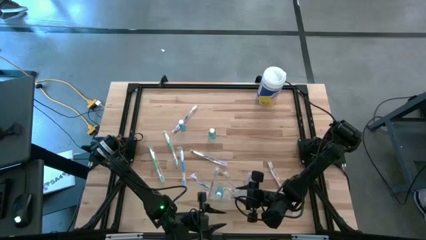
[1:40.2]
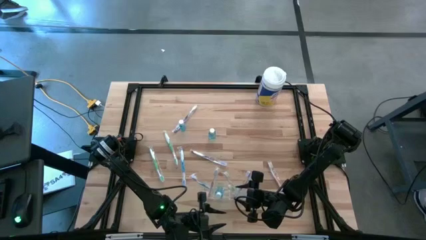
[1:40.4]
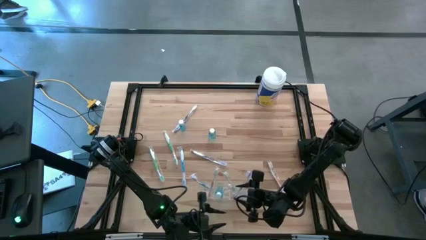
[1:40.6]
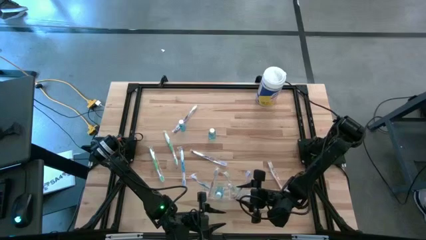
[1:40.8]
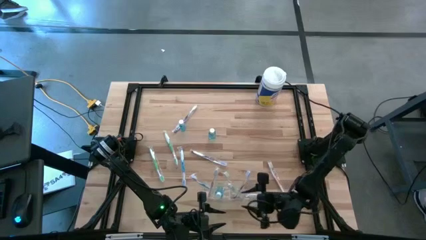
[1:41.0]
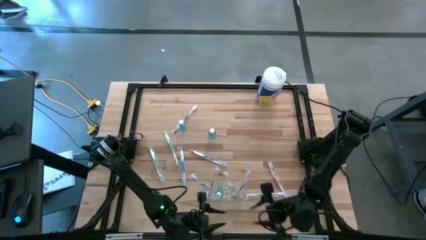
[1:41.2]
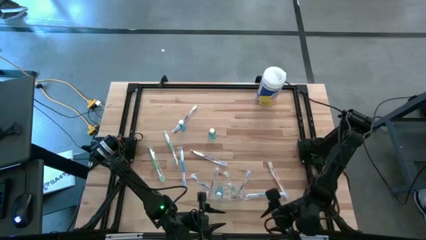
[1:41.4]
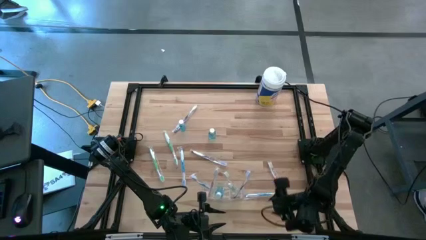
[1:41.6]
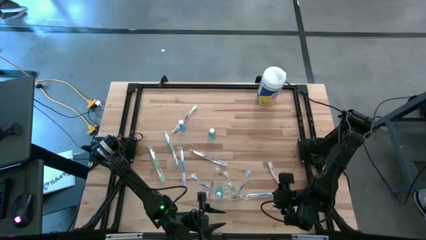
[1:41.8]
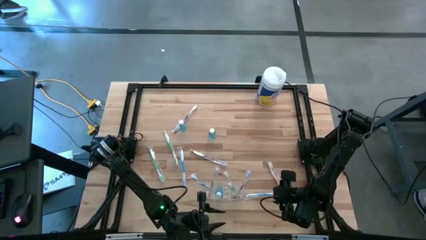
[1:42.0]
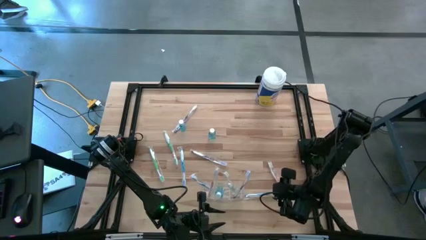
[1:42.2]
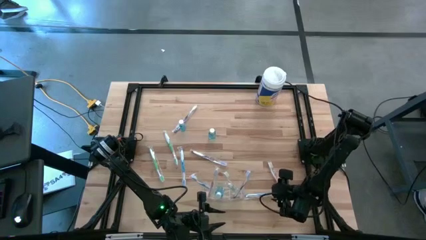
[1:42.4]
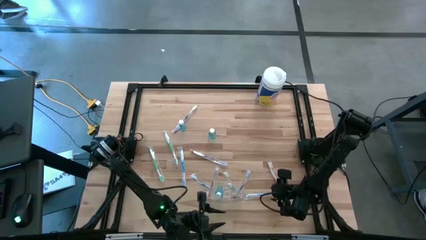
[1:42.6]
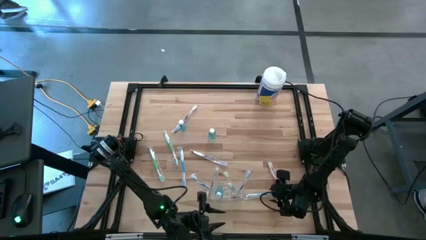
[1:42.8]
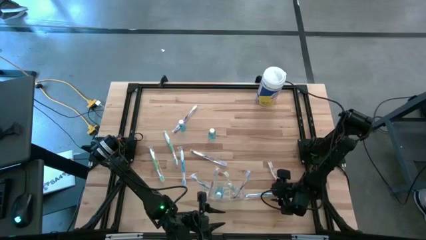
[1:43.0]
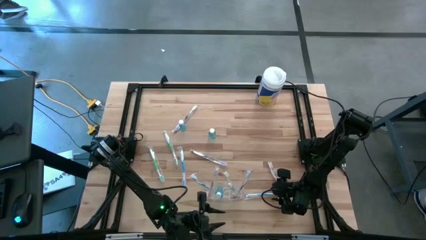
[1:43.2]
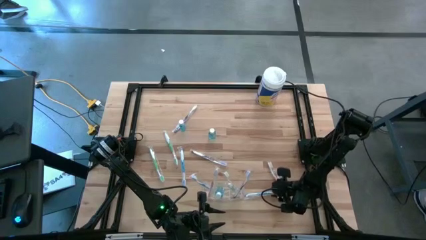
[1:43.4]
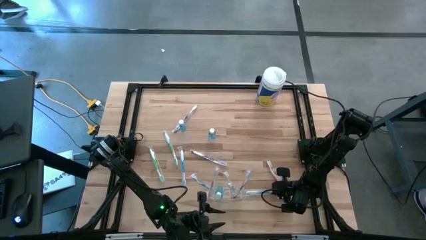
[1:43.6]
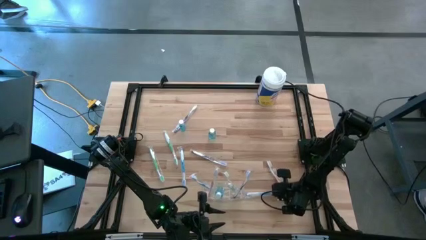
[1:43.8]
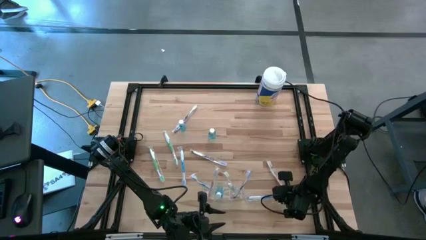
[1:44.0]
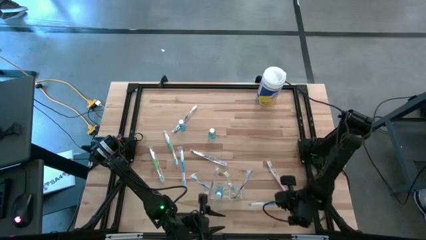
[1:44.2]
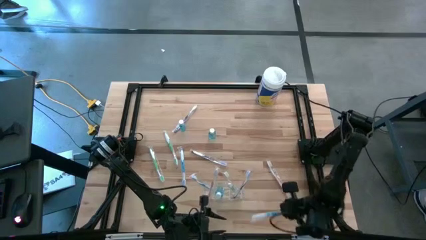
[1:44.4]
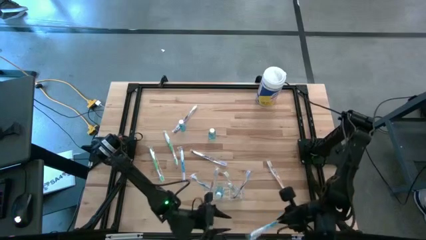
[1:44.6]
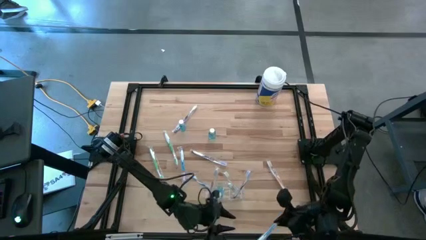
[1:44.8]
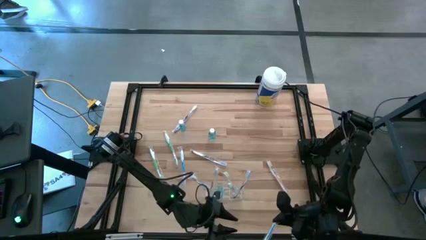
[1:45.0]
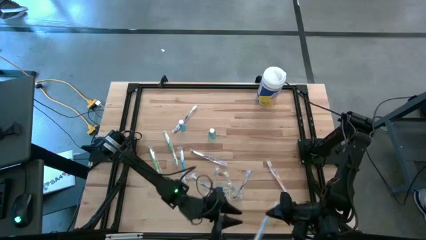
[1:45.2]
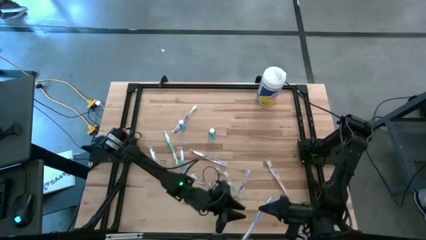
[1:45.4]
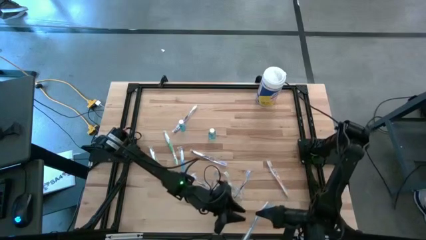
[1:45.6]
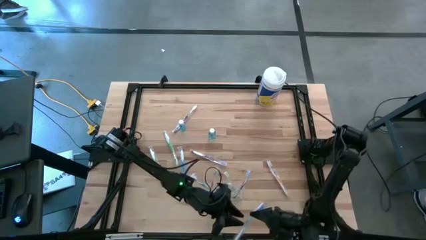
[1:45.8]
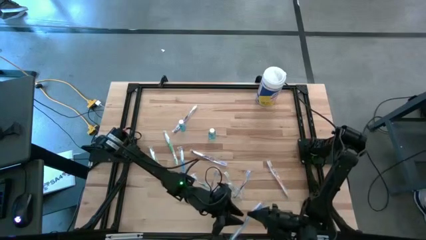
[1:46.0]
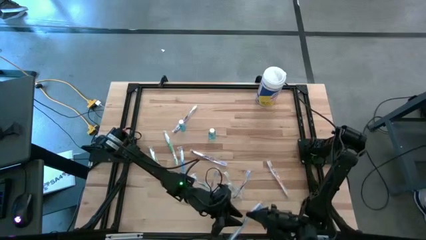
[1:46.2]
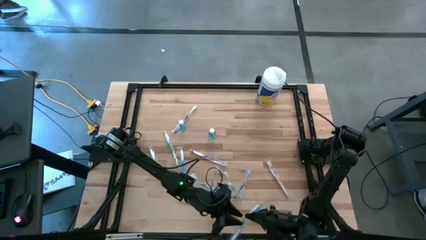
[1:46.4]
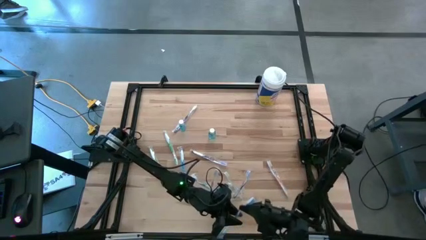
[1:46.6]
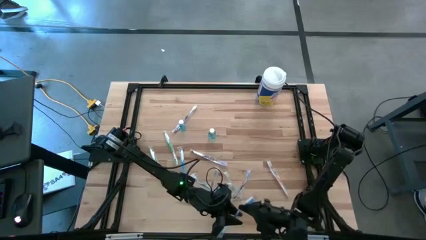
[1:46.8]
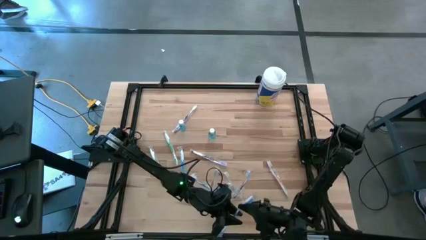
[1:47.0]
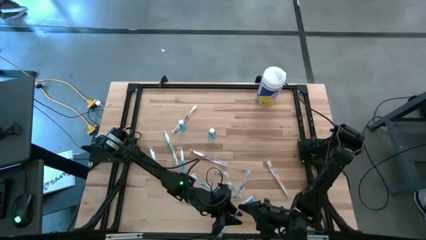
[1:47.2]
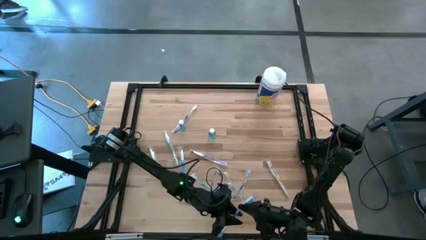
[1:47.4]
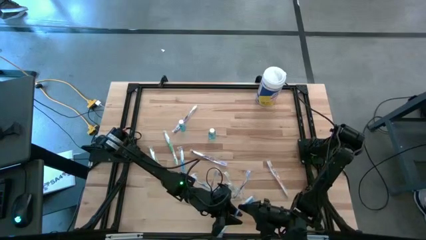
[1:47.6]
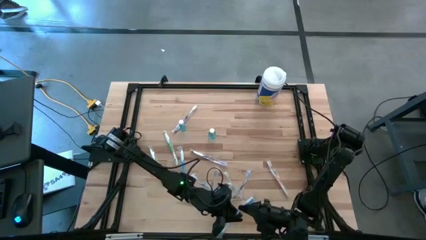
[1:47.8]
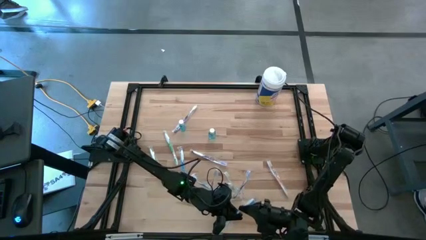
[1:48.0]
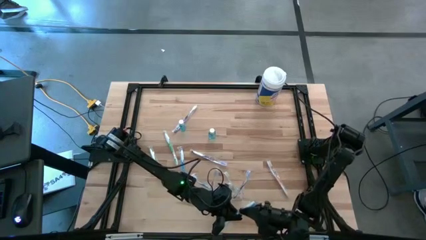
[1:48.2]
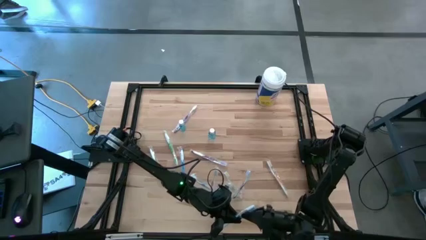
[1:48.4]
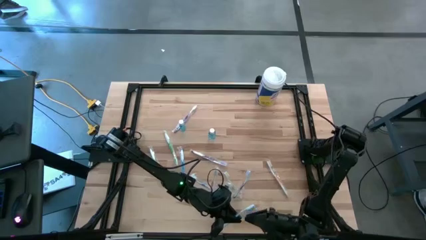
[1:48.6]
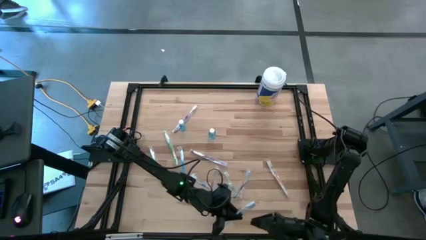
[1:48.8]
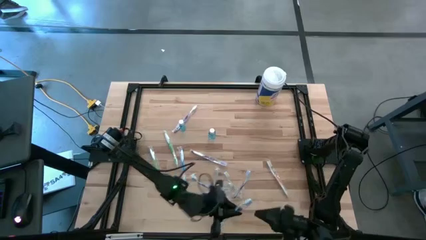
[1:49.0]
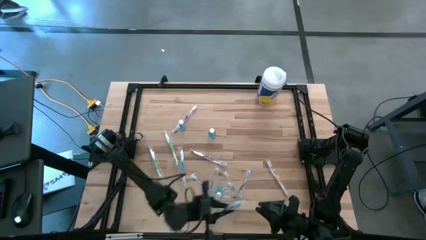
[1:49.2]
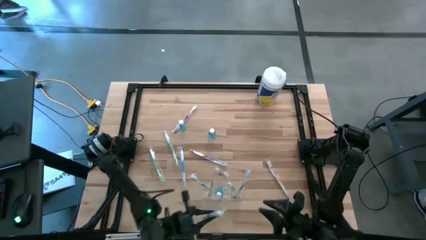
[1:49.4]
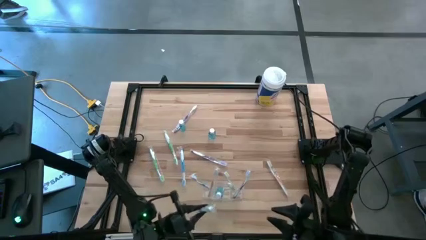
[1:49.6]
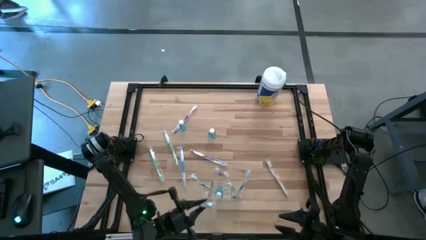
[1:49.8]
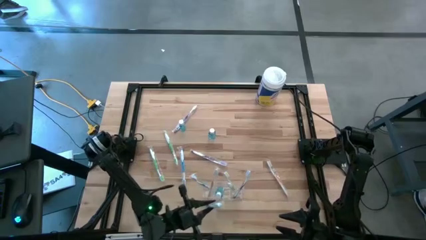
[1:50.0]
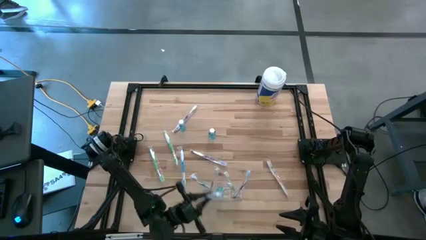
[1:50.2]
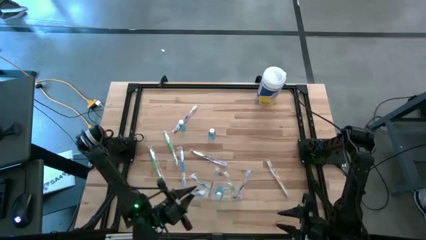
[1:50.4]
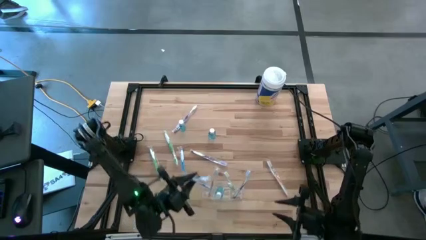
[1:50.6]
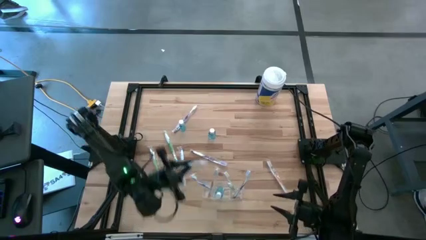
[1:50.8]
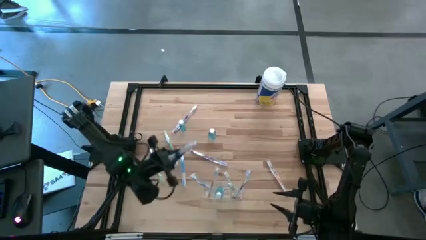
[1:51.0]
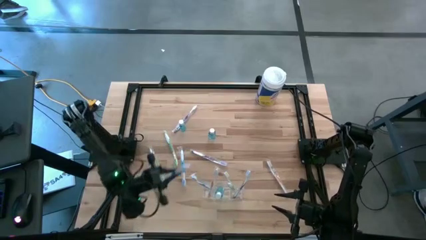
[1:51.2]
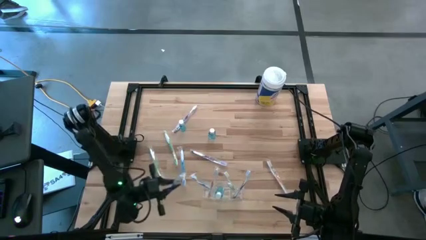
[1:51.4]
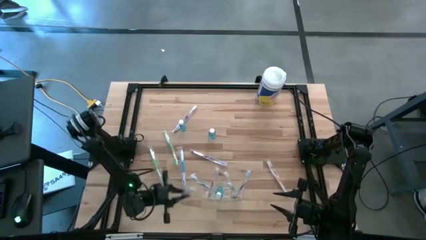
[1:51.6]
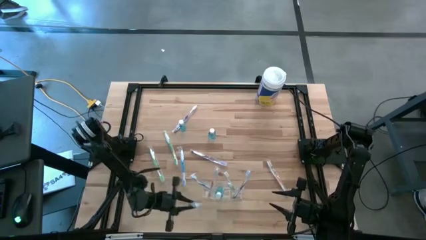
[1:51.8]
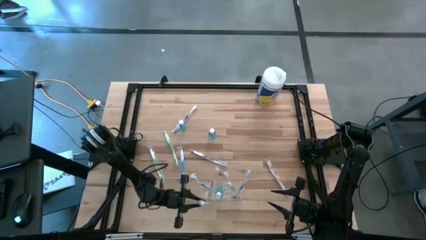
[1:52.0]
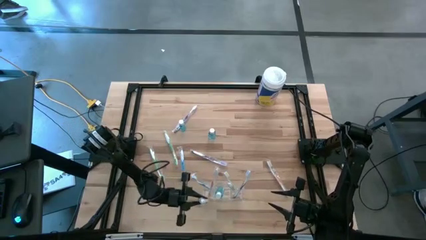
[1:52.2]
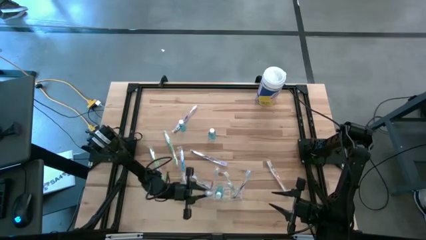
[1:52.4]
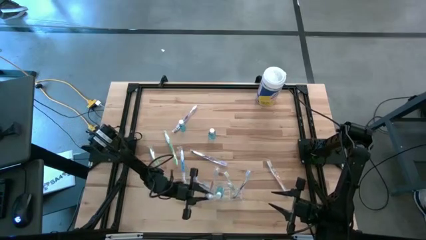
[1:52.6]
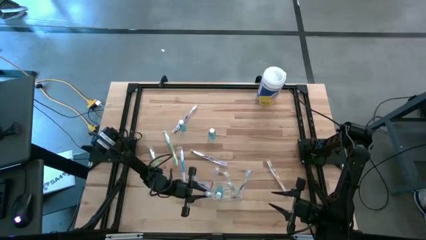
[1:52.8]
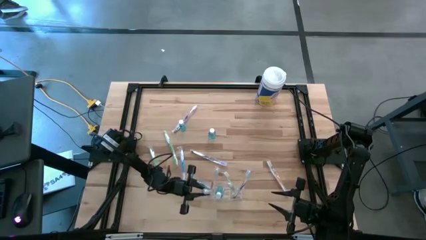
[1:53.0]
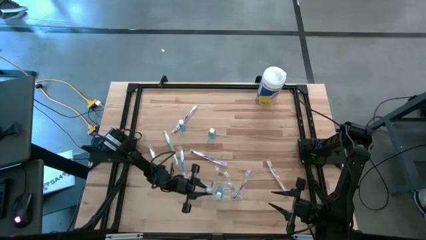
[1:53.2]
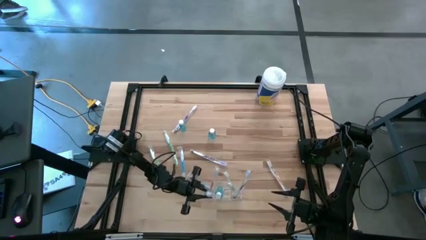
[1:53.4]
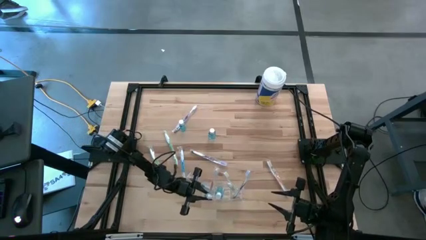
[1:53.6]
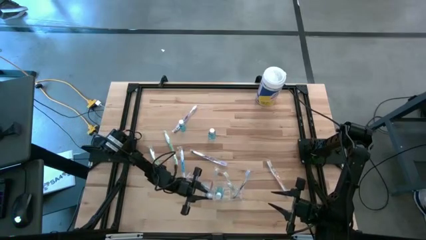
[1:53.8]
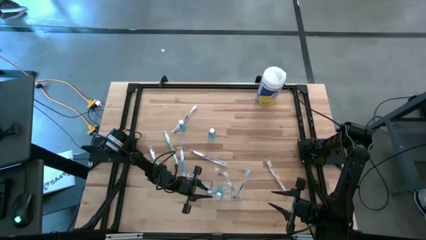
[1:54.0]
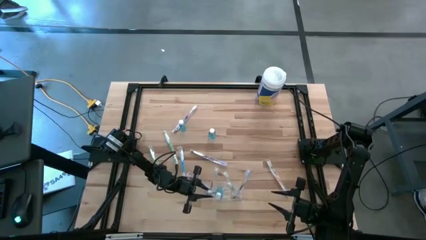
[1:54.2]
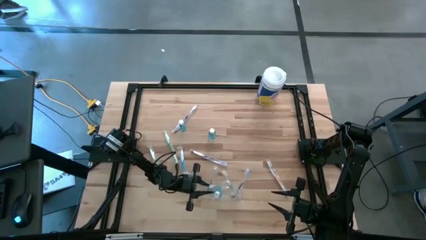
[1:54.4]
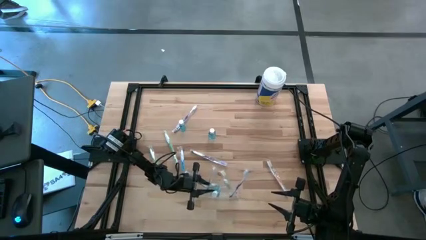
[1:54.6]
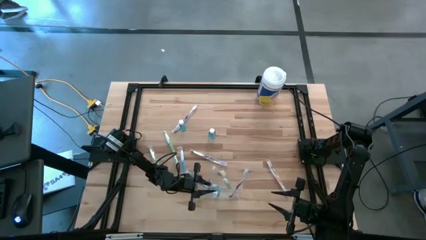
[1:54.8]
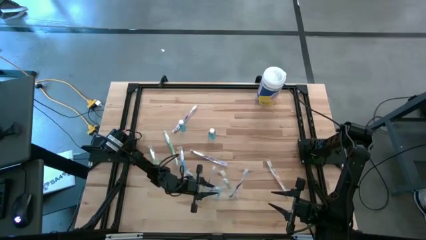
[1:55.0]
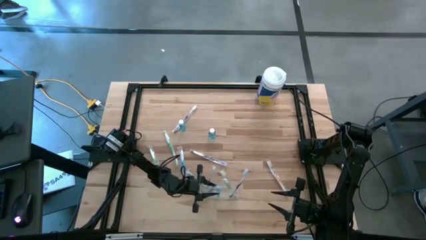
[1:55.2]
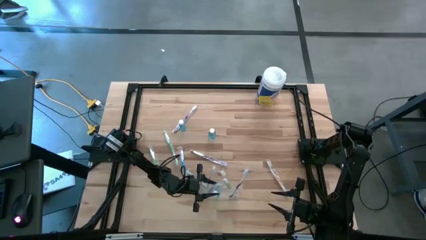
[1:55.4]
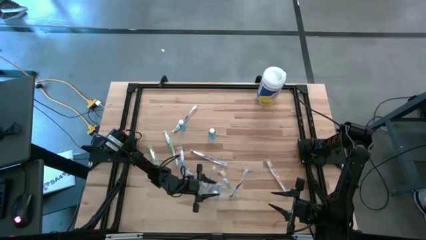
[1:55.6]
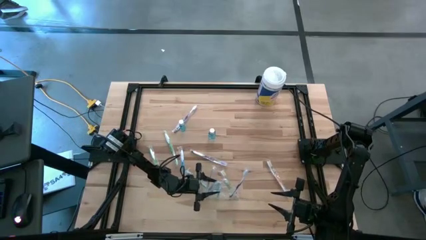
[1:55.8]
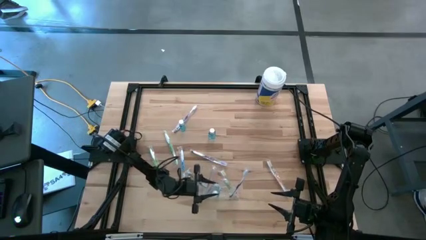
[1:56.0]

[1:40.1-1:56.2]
Task: Pick & Place toothbrushing station
Put the blue toothbrush into the transparent organizer
